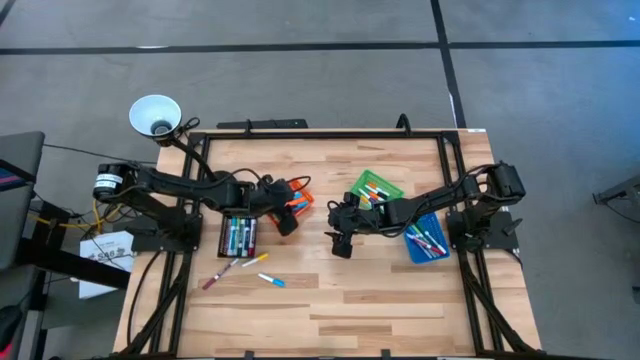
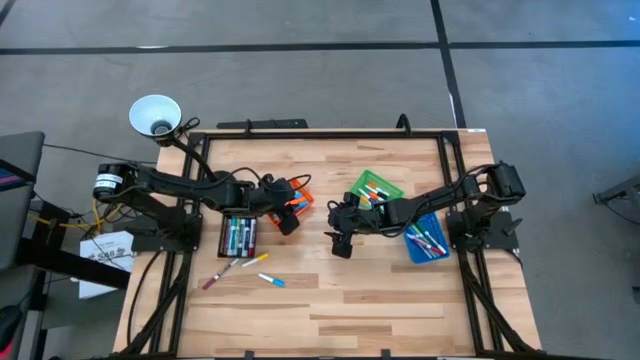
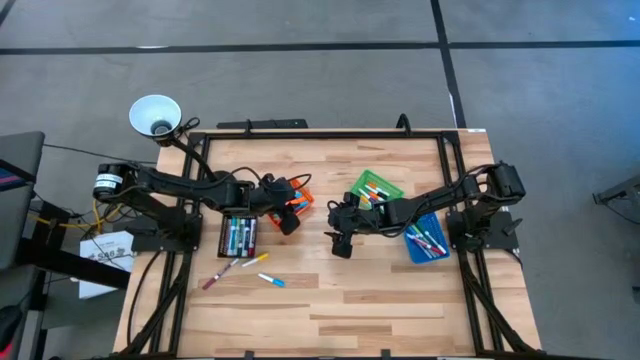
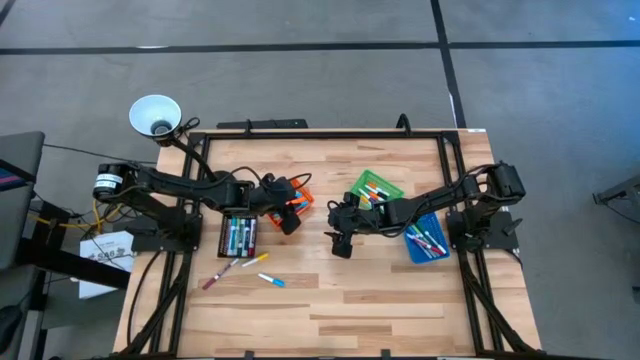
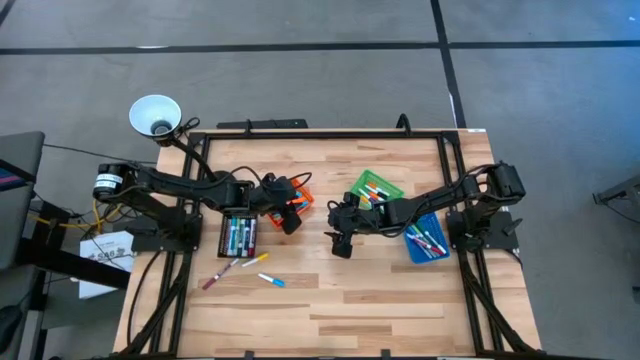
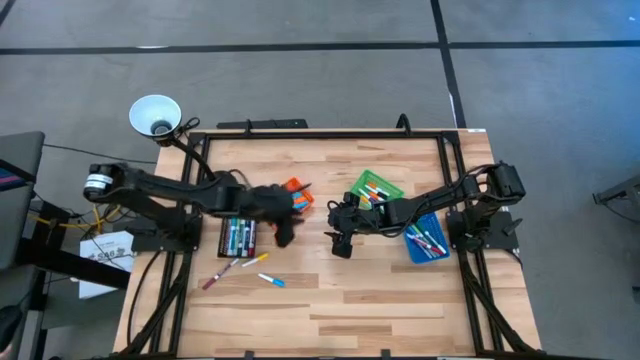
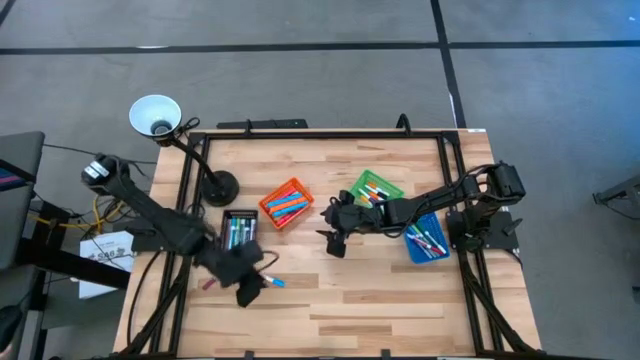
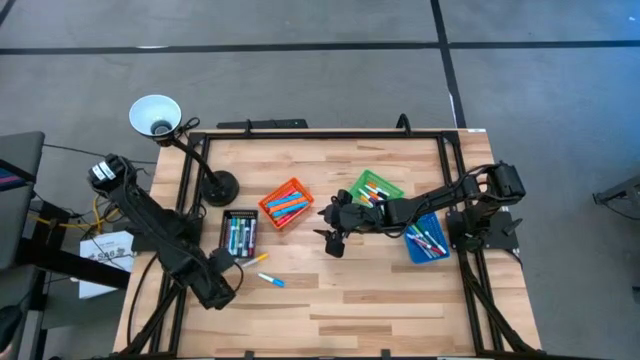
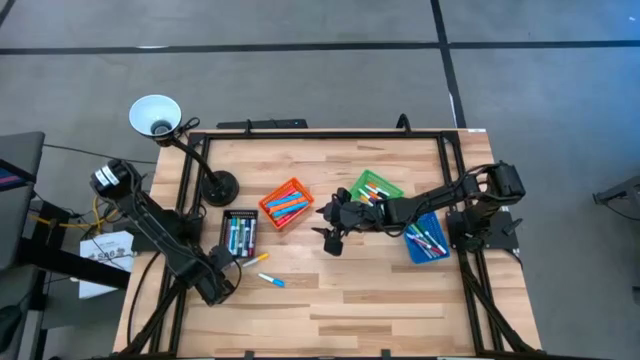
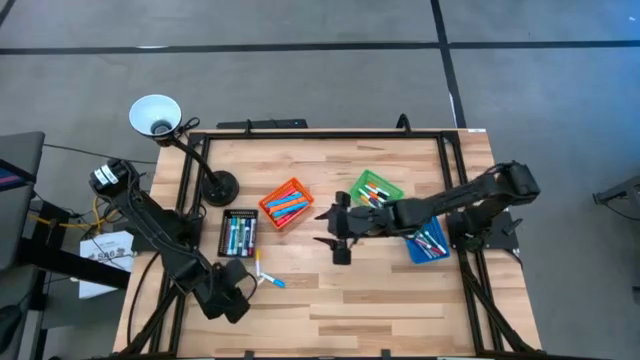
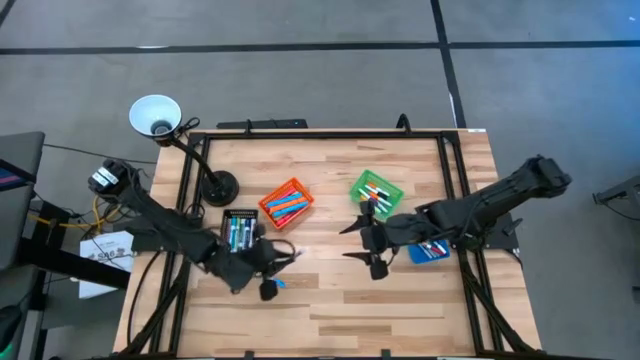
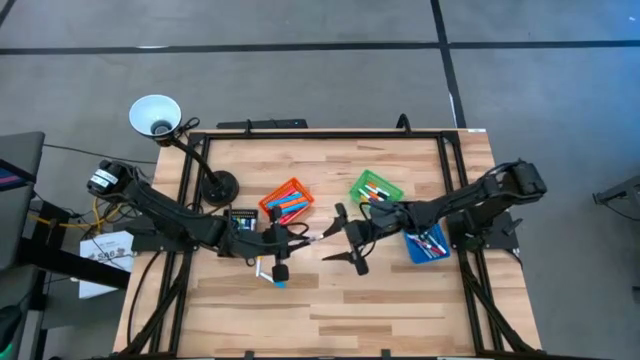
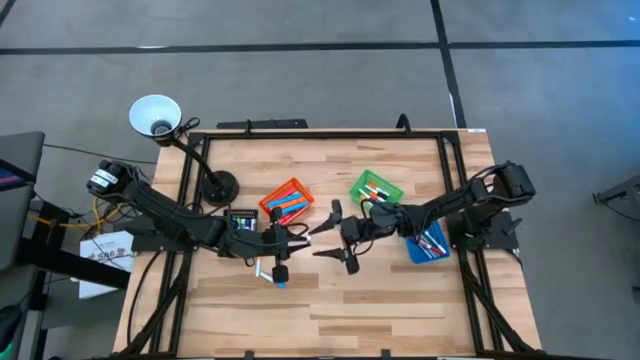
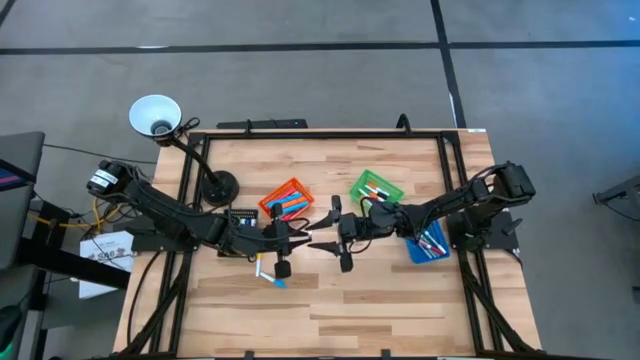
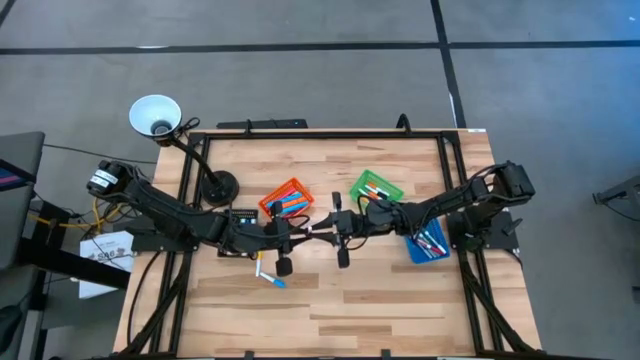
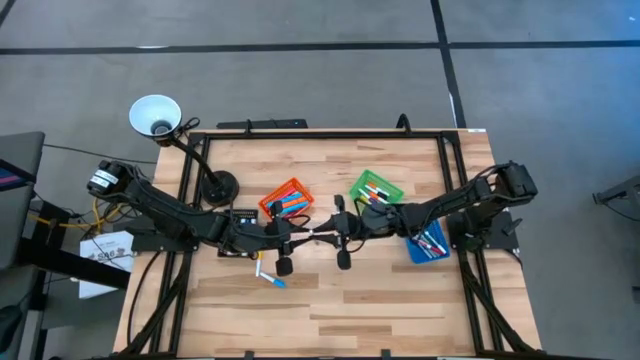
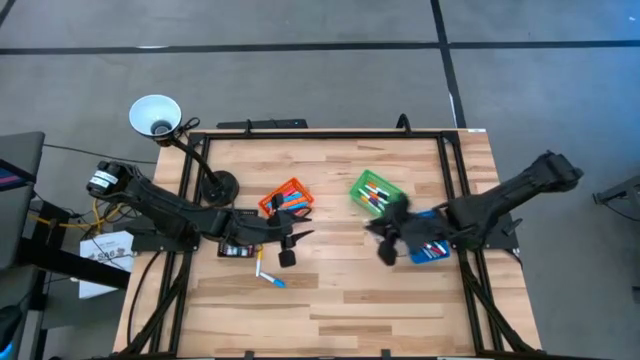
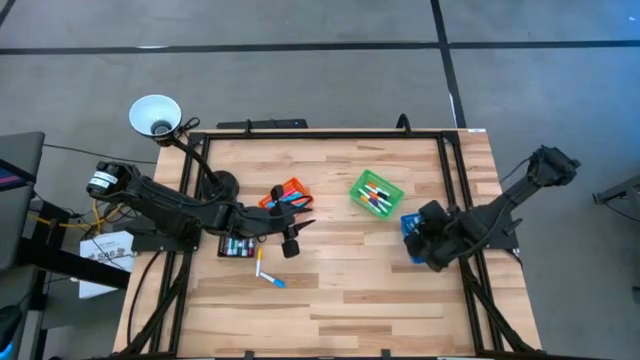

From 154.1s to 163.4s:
Task: Pick & Place Markers
Put the violet marker pen into the blue bin

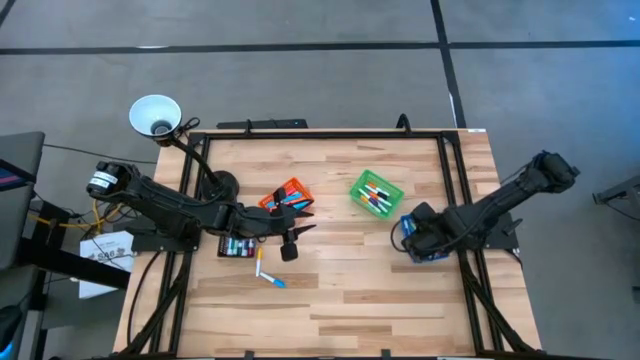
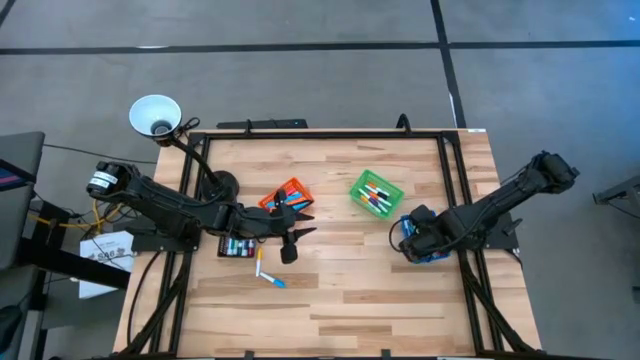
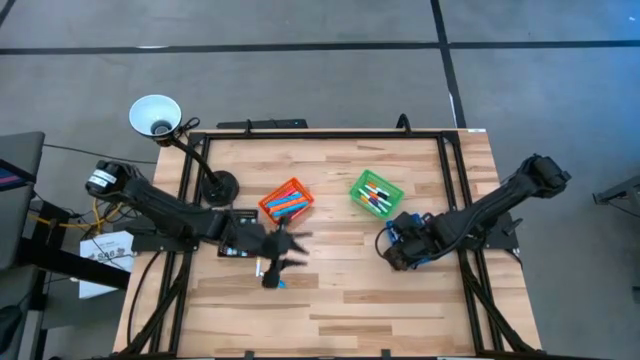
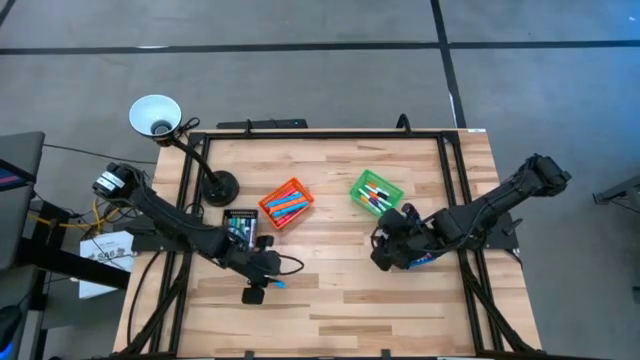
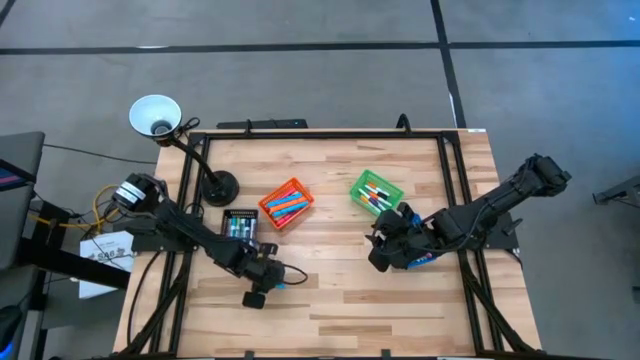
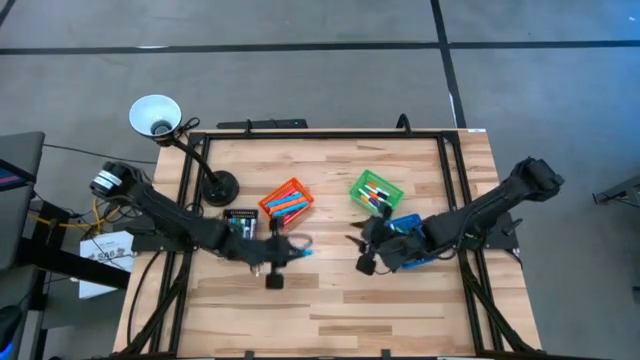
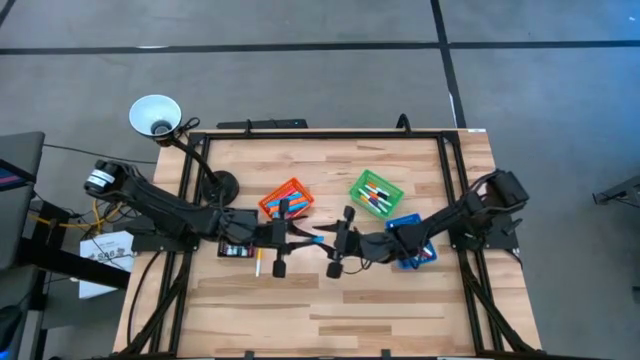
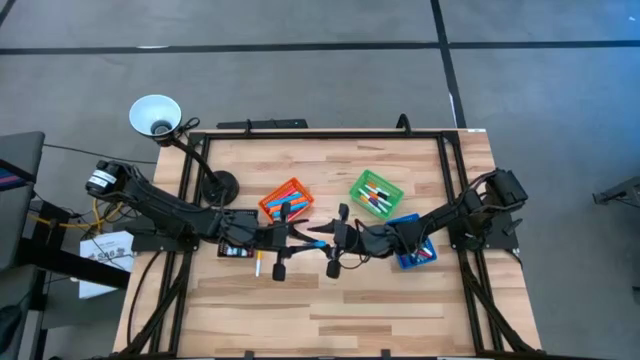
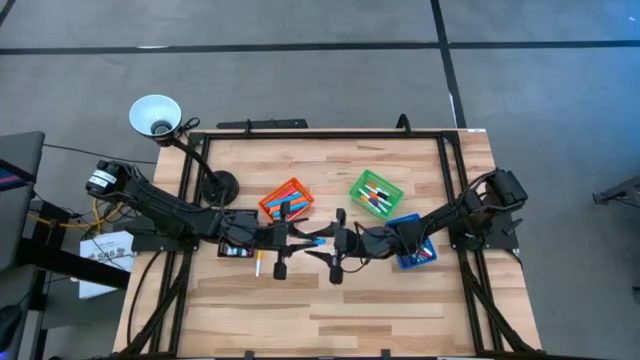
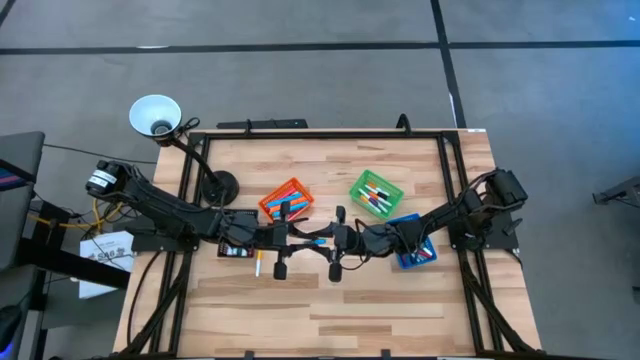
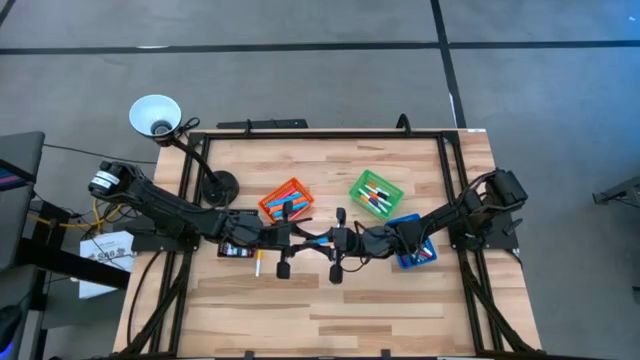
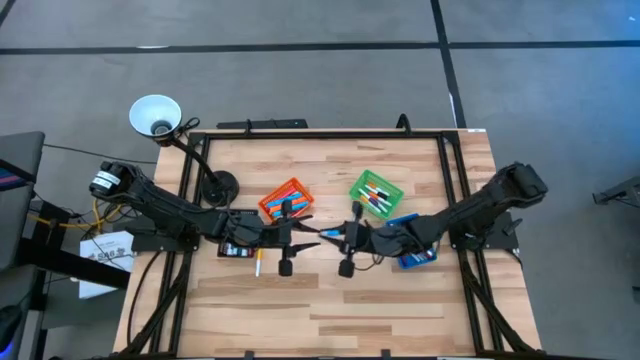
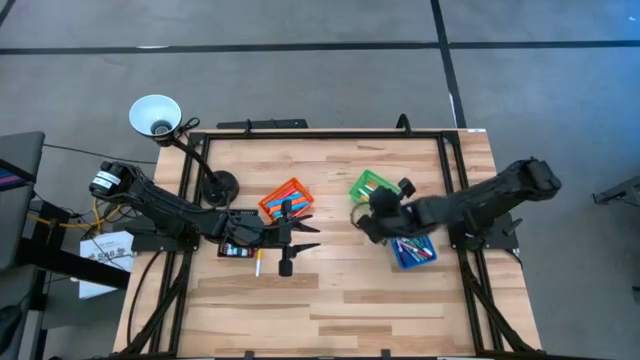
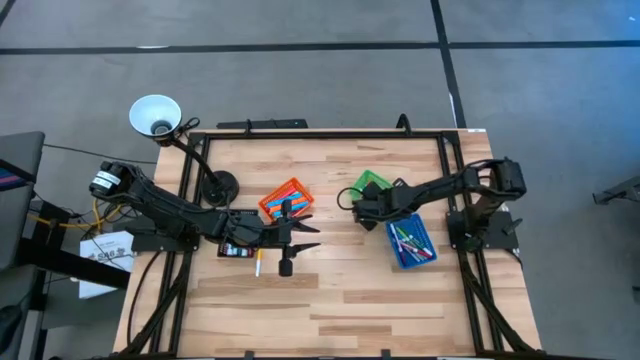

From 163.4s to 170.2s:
Put the light blue pen into the green bin

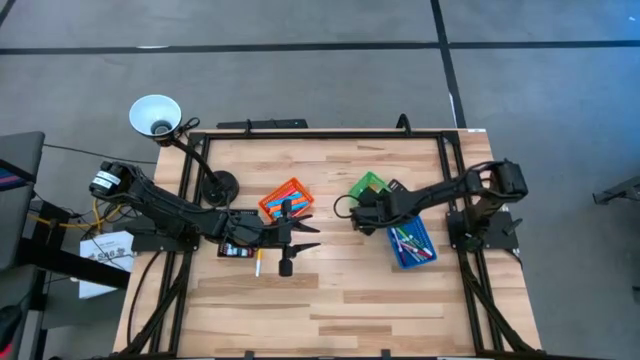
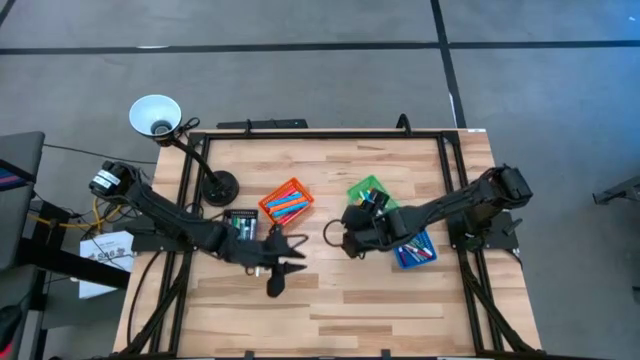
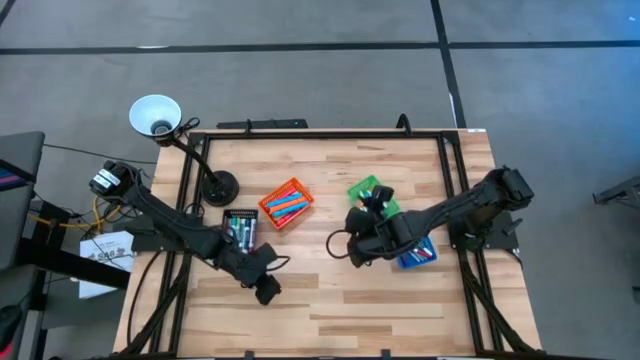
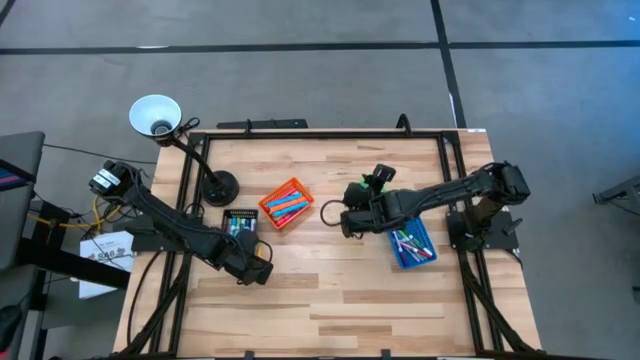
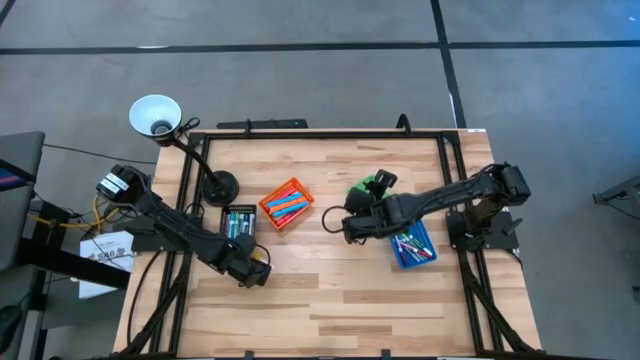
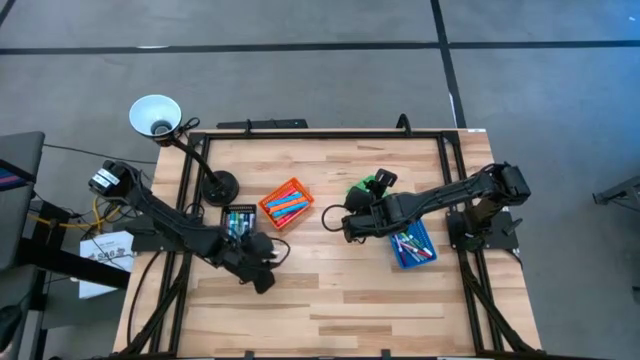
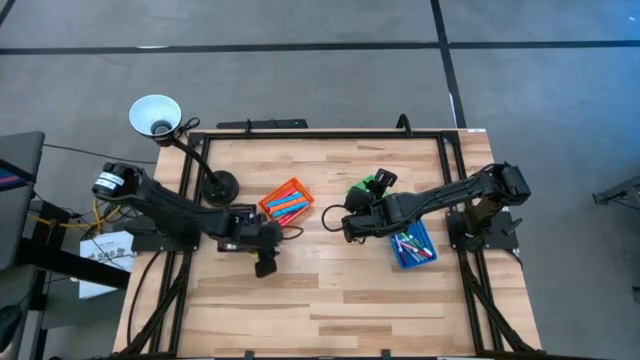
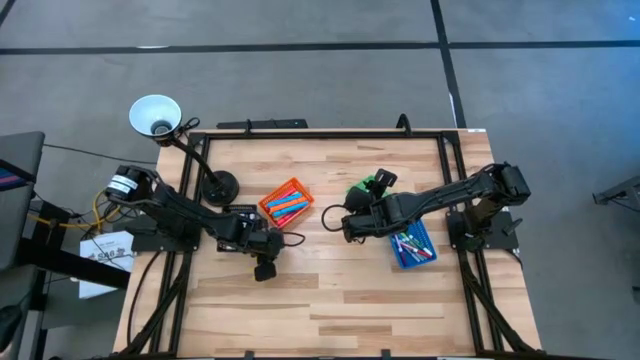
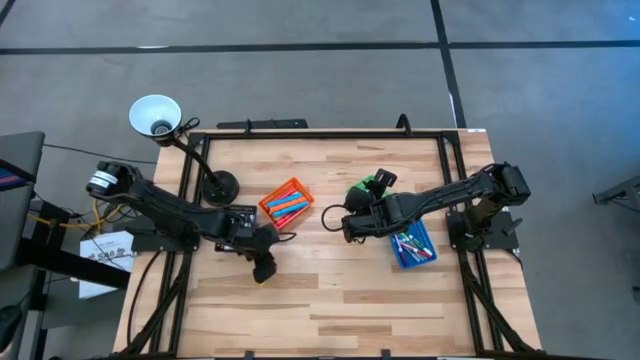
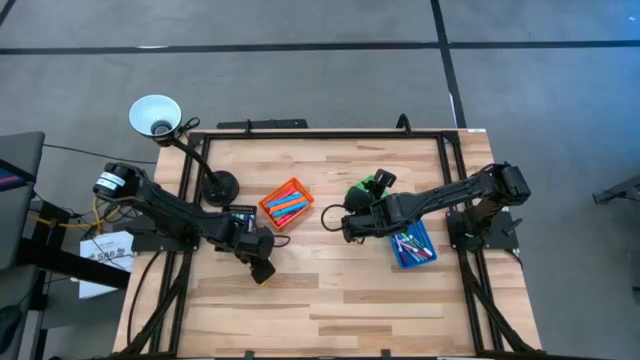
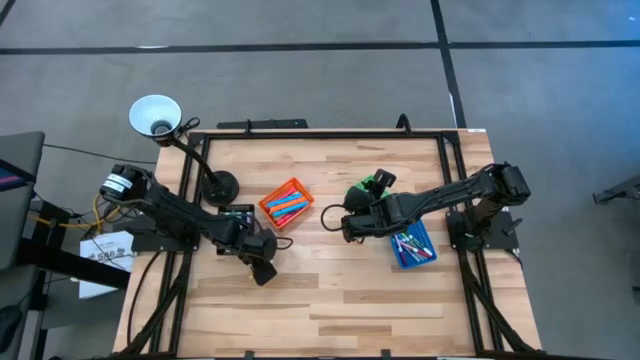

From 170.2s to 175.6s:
Put the yellow pen into the green bin
